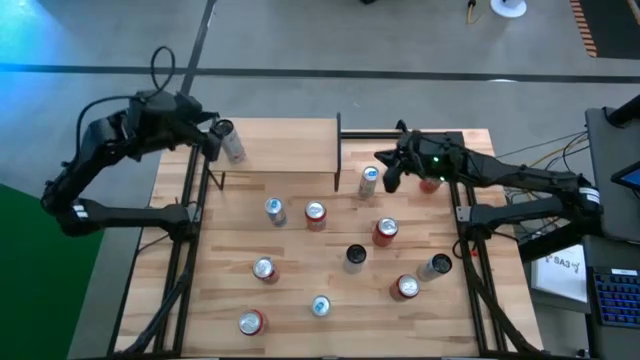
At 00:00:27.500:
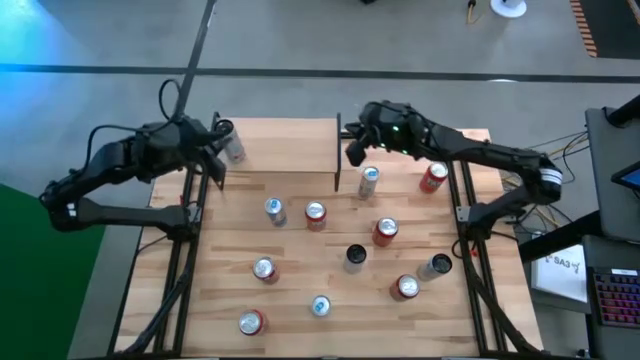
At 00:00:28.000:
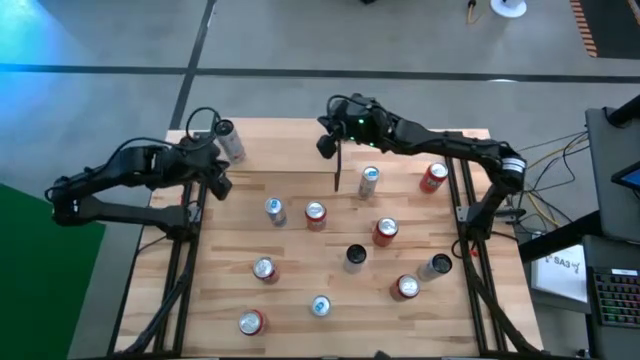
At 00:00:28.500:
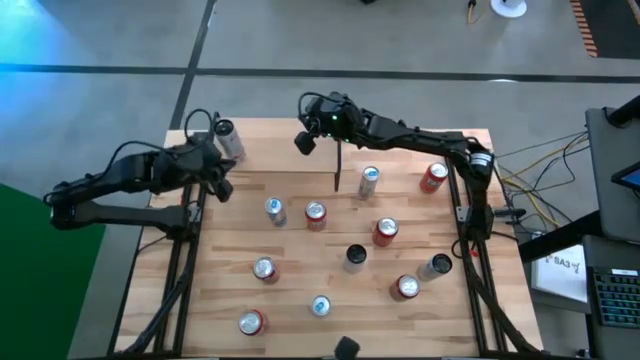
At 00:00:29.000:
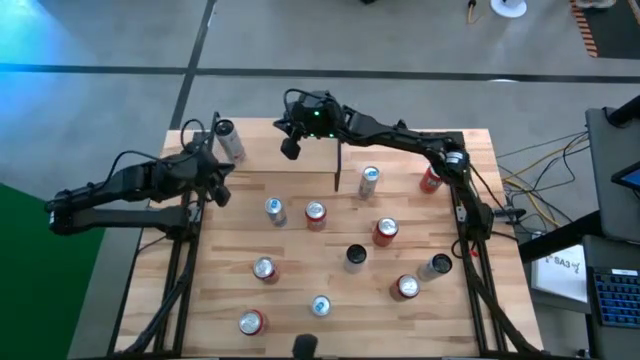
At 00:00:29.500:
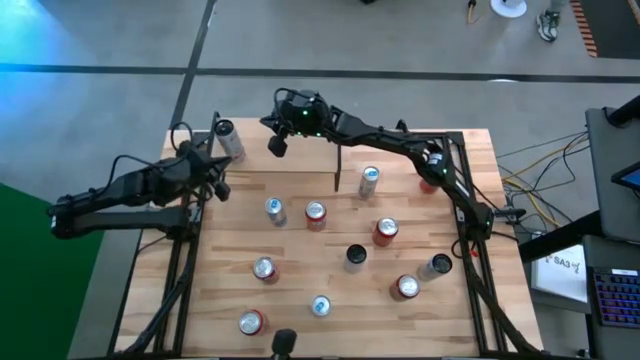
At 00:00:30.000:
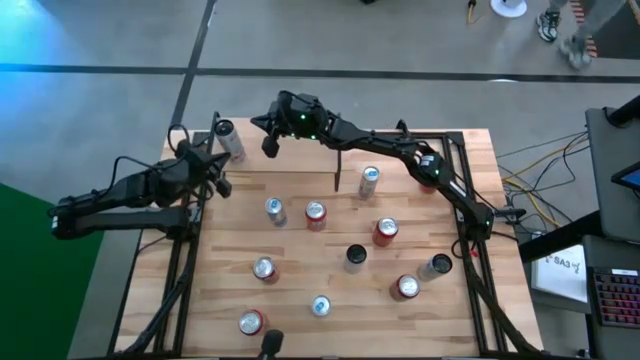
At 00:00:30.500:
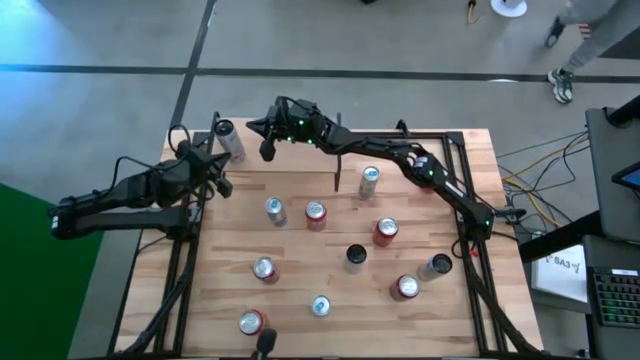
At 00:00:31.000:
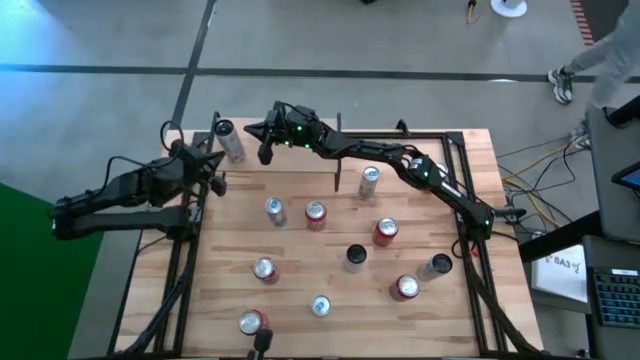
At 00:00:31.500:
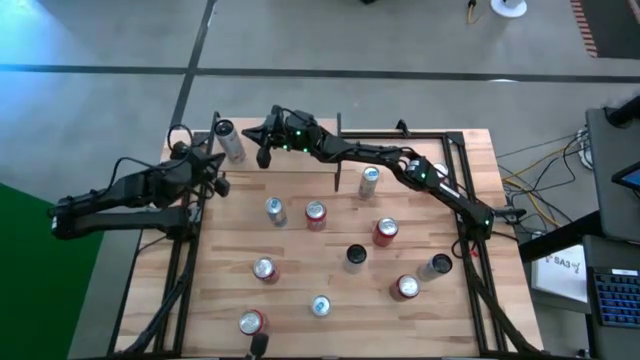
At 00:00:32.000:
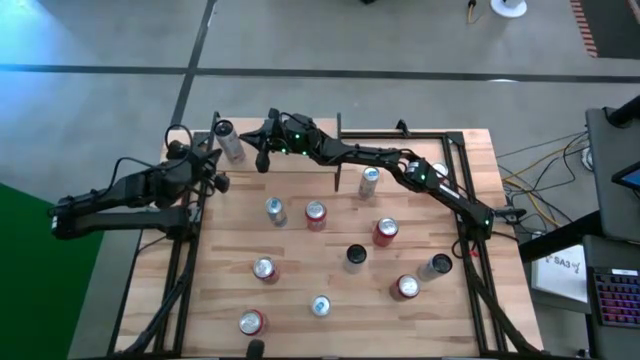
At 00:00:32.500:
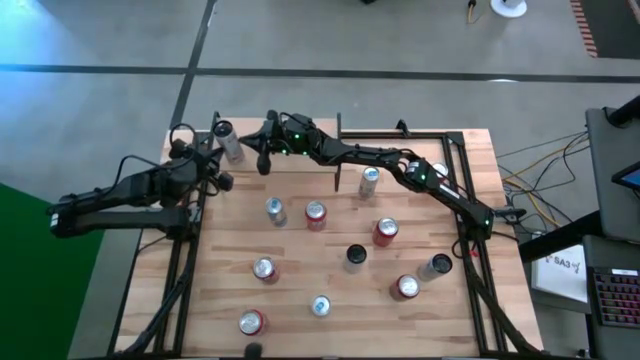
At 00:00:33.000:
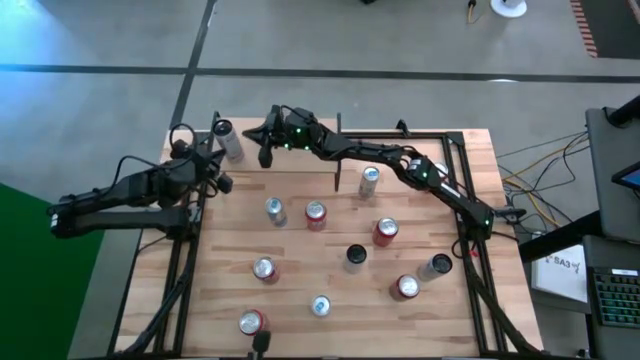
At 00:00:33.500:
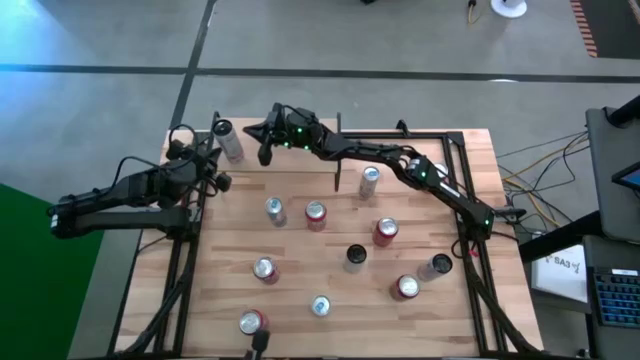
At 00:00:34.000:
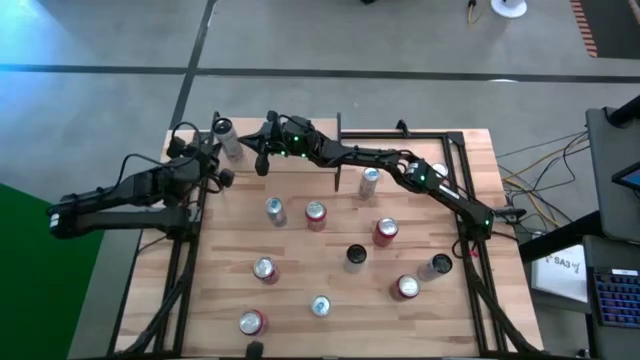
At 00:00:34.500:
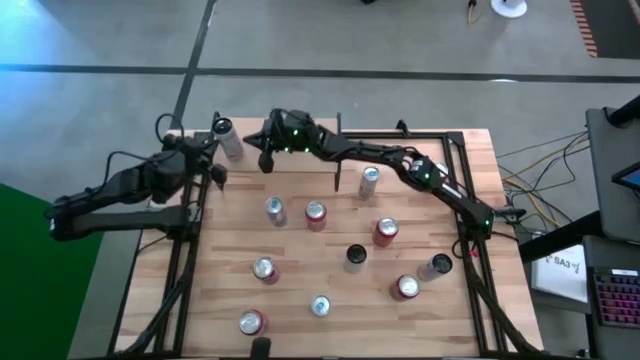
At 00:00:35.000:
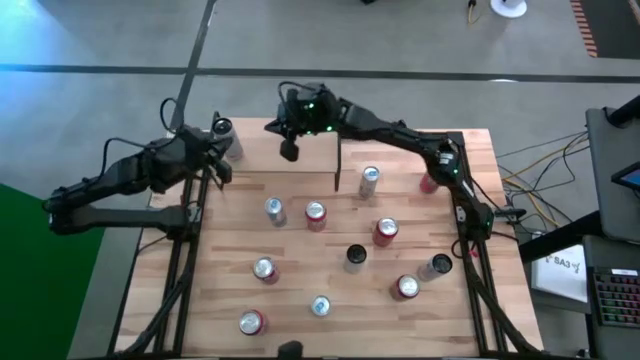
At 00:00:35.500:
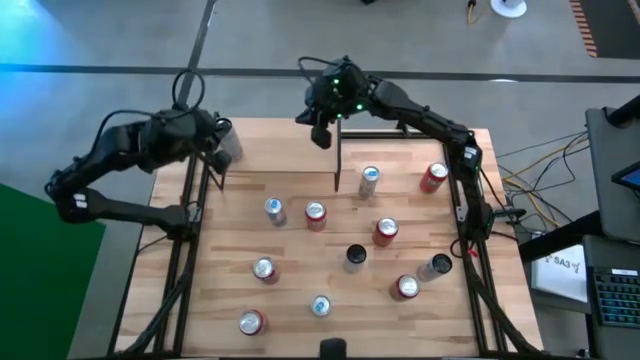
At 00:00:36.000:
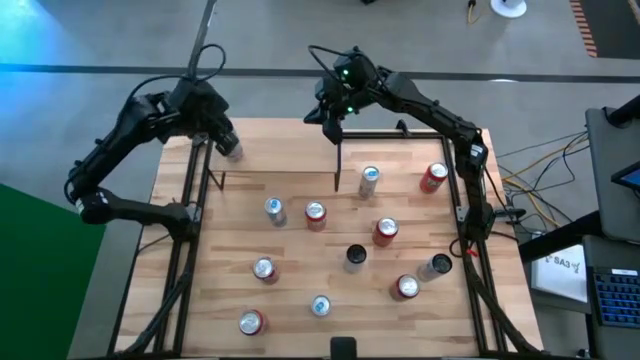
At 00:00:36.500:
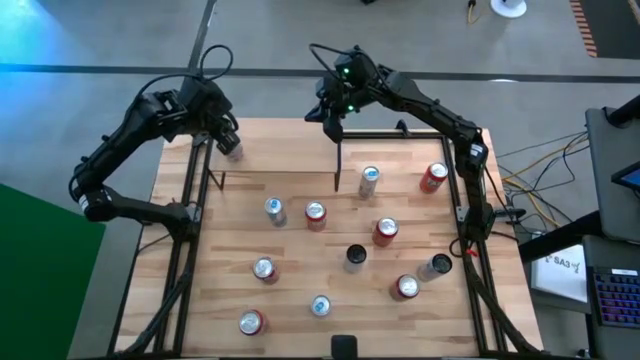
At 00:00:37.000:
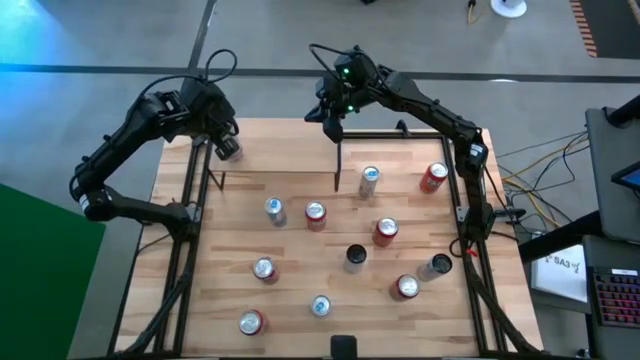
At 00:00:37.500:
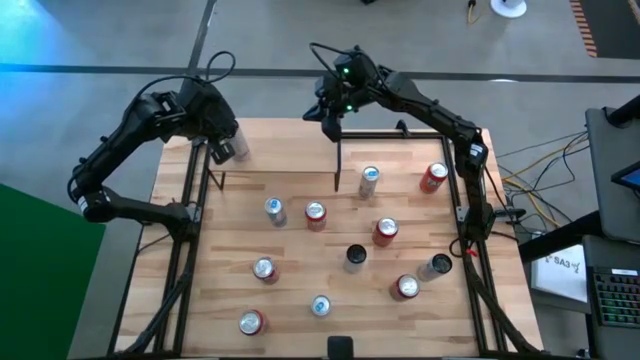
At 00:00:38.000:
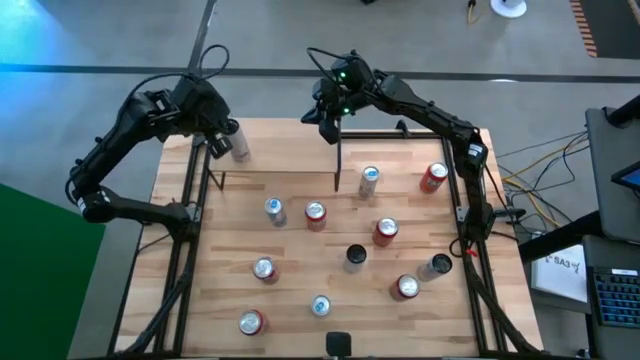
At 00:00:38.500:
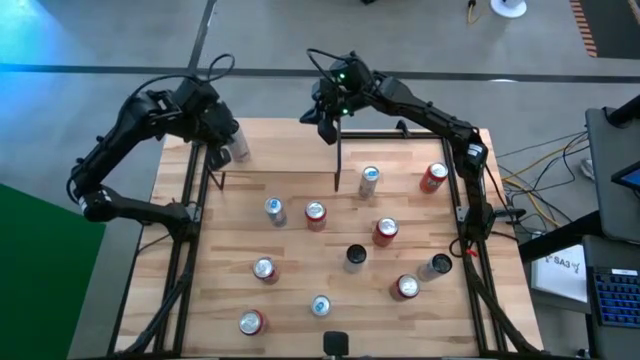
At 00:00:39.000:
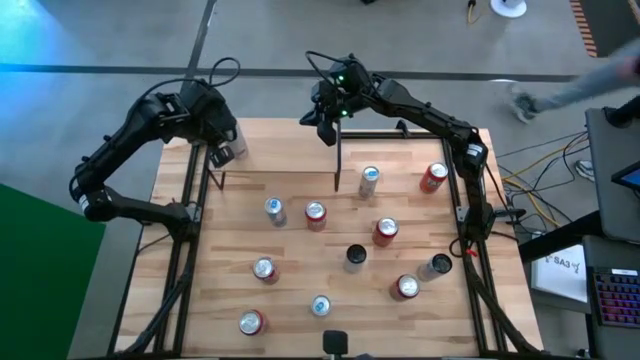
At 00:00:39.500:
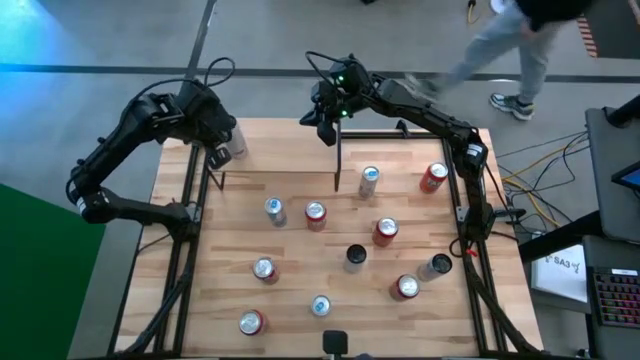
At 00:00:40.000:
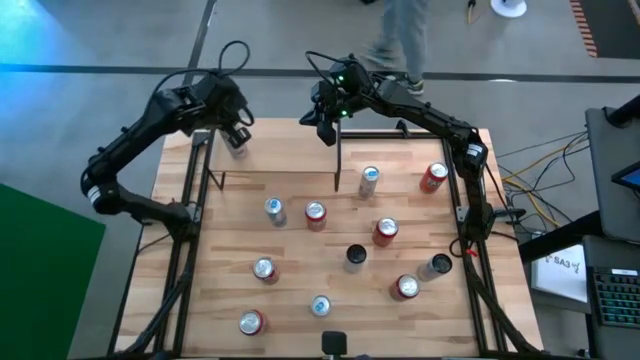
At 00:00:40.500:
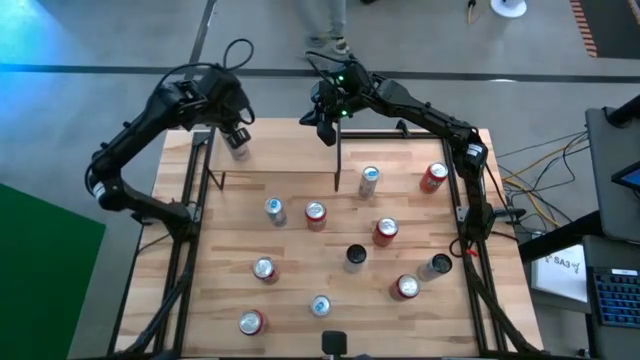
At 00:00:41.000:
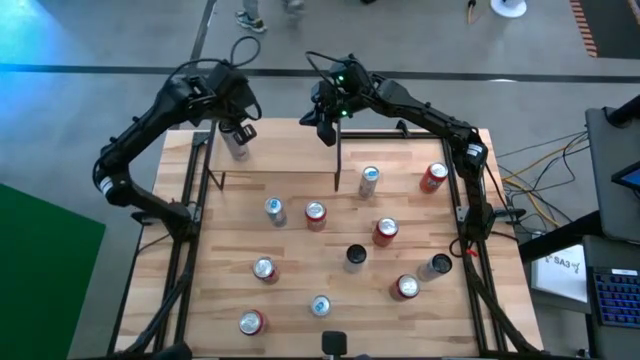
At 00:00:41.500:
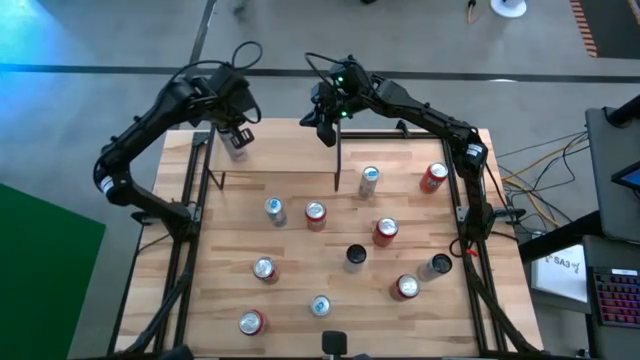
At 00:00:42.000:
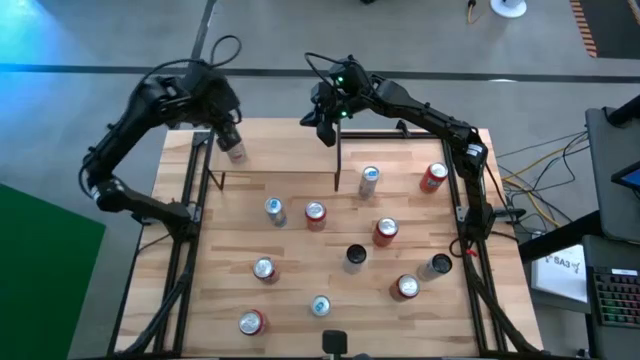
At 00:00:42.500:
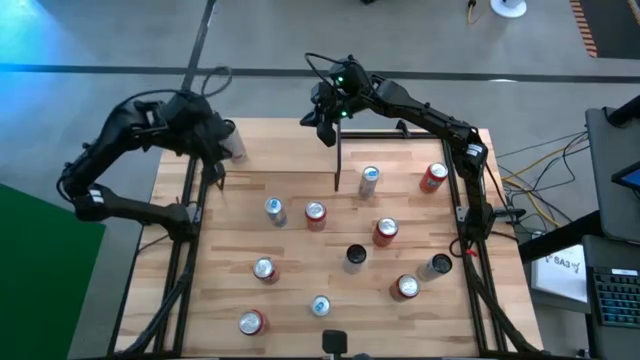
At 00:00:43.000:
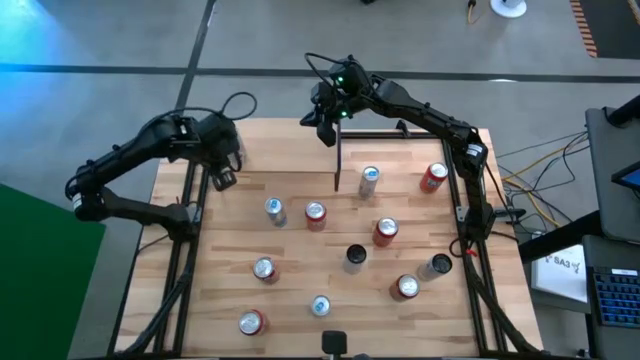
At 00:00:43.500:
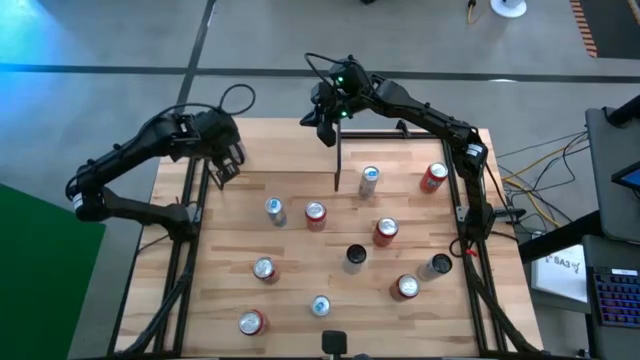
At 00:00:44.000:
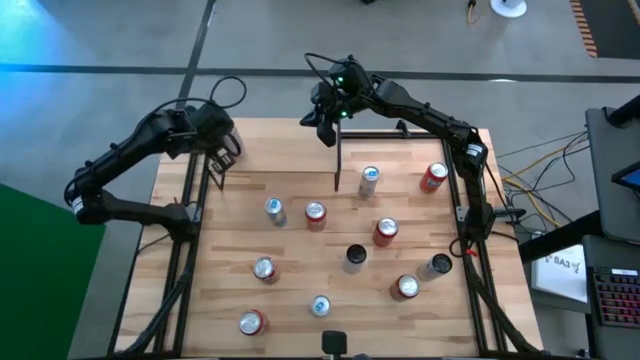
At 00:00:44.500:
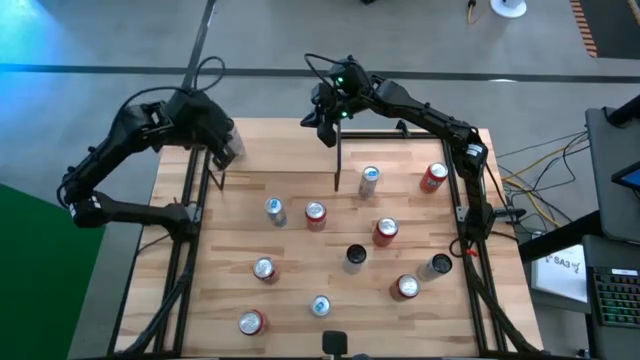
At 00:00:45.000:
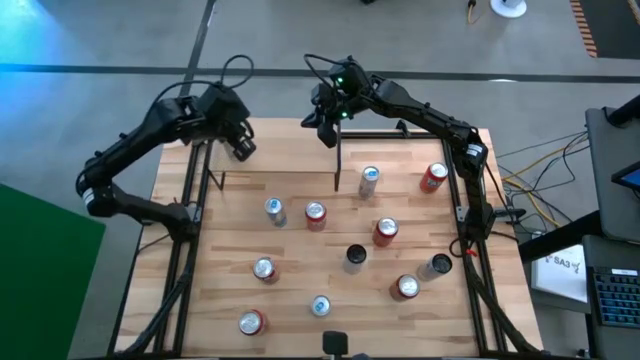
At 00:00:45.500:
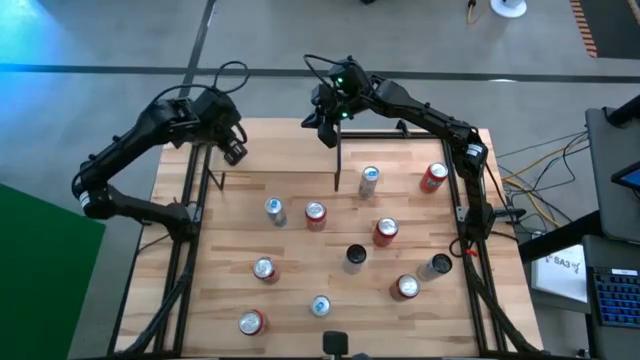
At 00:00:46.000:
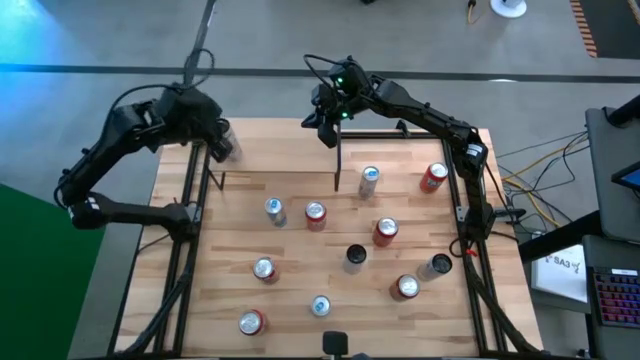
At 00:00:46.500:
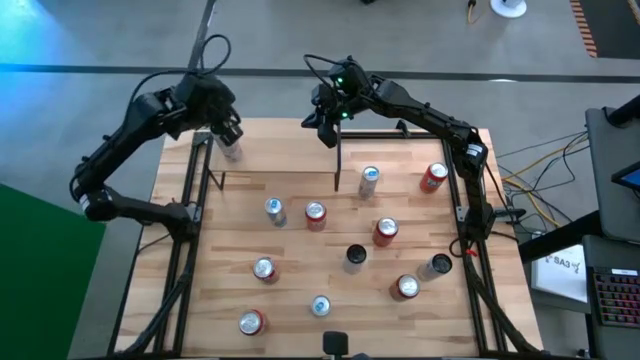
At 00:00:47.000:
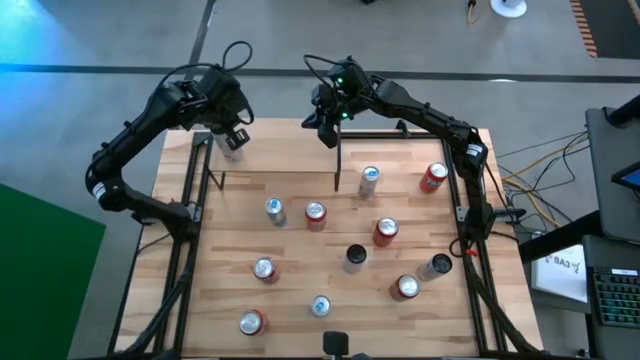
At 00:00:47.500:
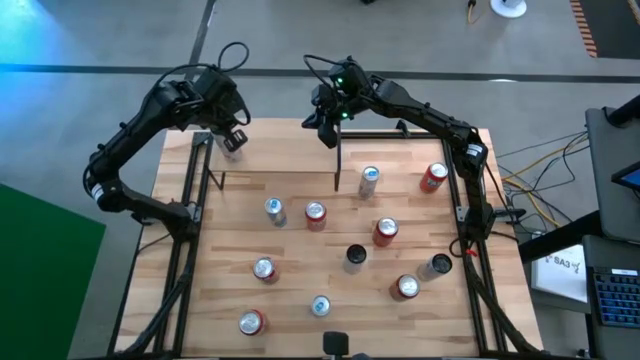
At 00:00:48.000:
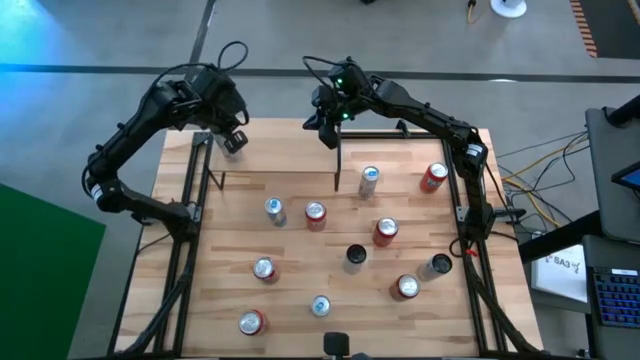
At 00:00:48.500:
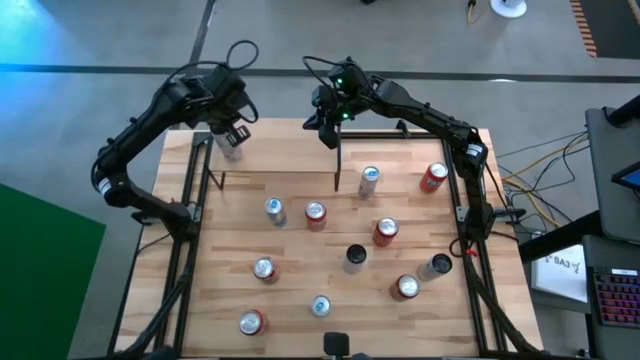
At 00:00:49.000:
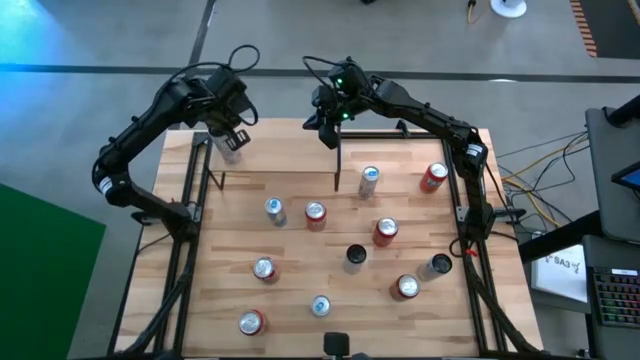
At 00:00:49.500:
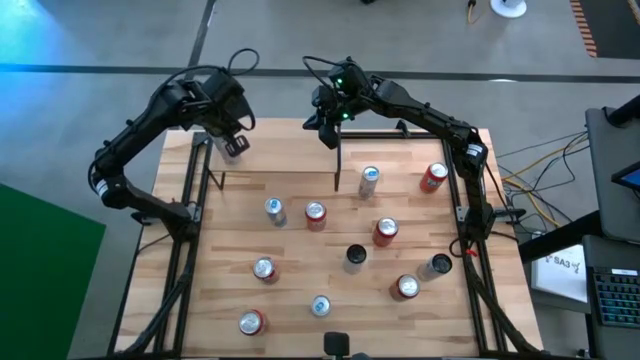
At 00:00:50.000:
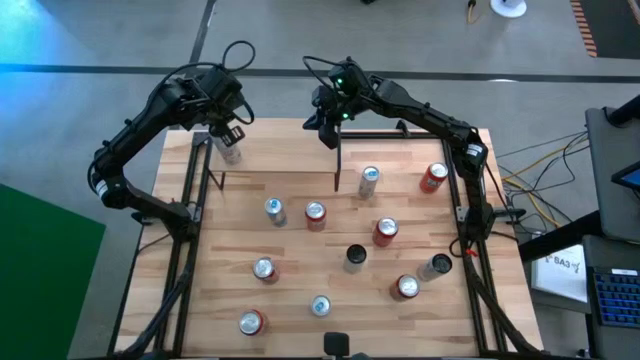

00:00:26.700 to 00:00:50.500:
Task: Place canned beverage on shelf
Put the white pink soda can on the shelf
